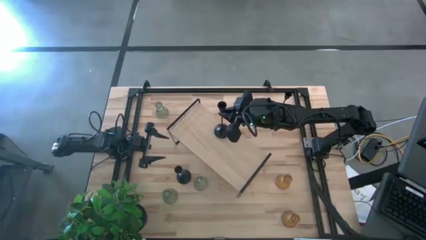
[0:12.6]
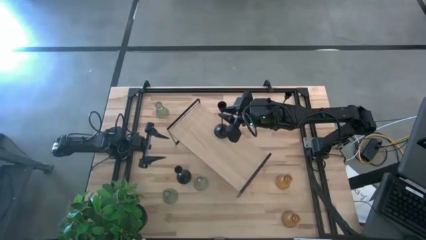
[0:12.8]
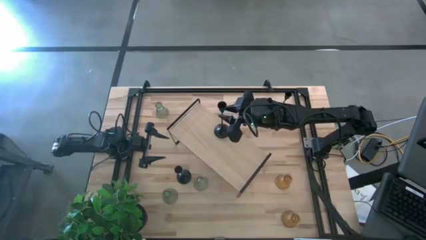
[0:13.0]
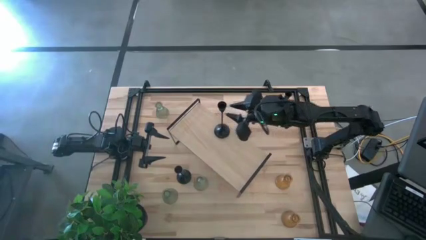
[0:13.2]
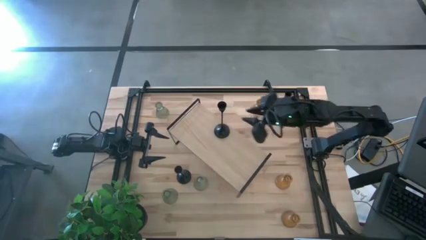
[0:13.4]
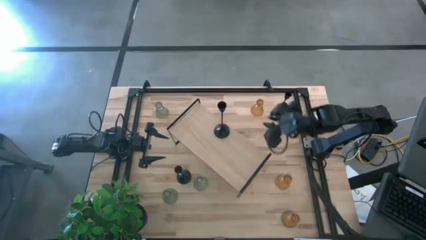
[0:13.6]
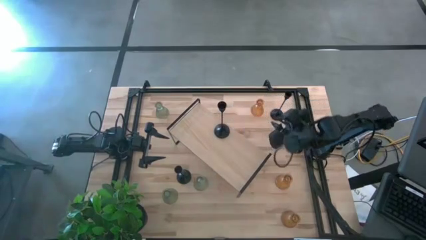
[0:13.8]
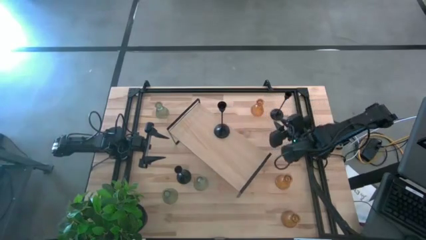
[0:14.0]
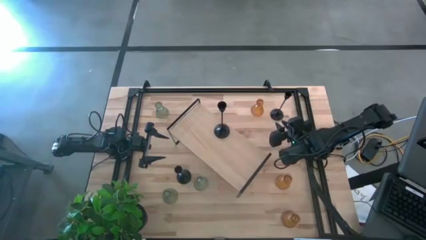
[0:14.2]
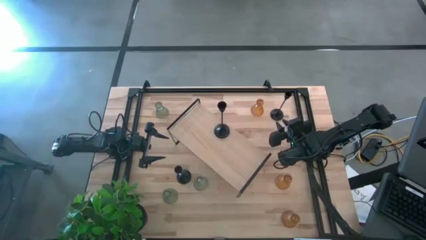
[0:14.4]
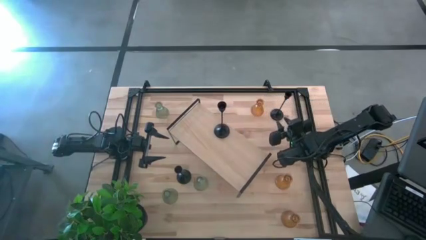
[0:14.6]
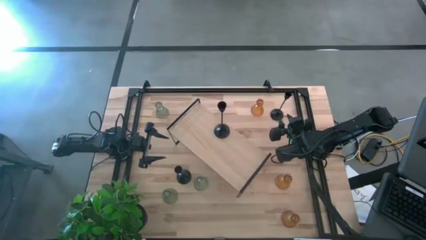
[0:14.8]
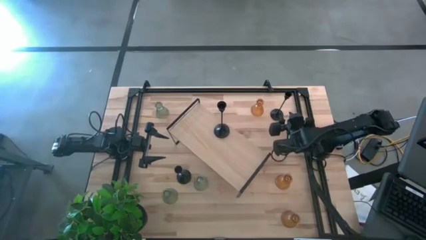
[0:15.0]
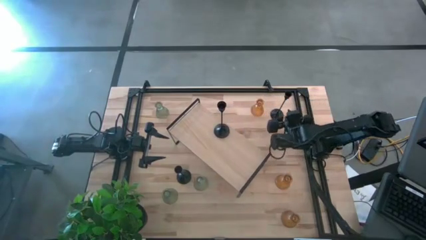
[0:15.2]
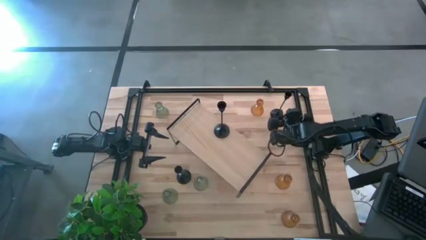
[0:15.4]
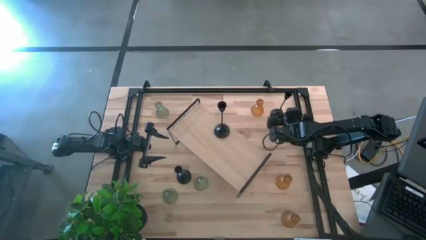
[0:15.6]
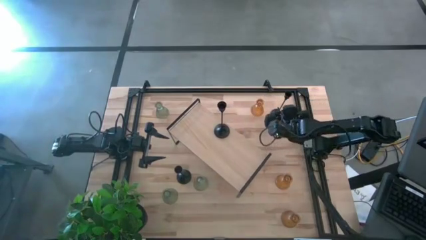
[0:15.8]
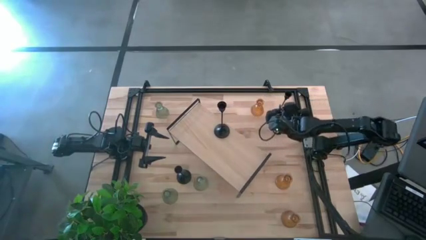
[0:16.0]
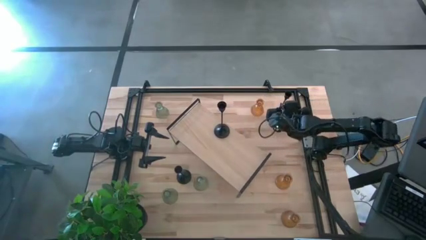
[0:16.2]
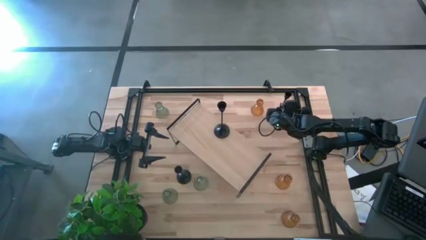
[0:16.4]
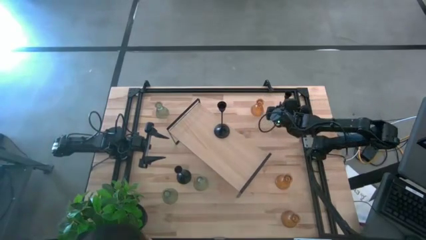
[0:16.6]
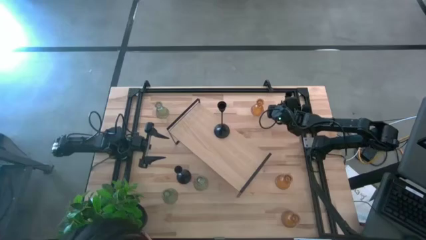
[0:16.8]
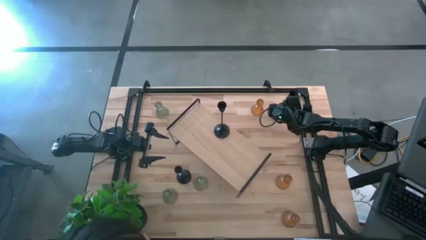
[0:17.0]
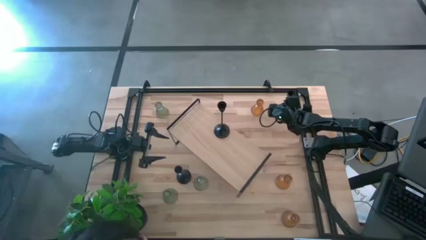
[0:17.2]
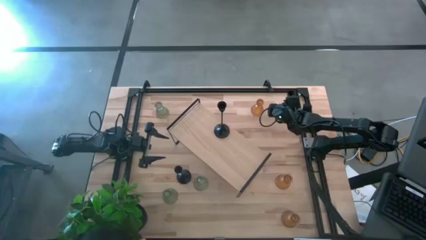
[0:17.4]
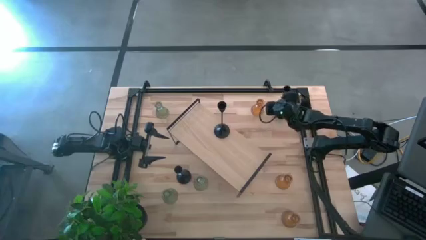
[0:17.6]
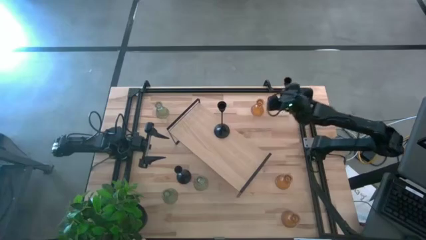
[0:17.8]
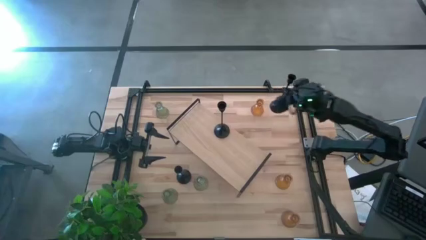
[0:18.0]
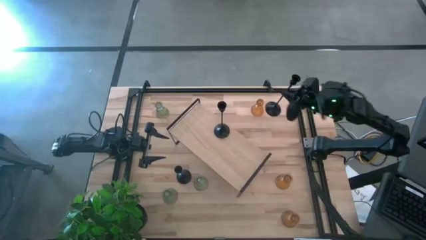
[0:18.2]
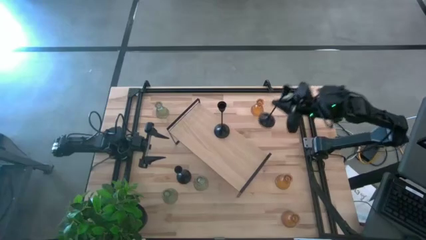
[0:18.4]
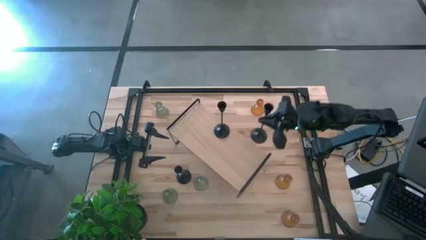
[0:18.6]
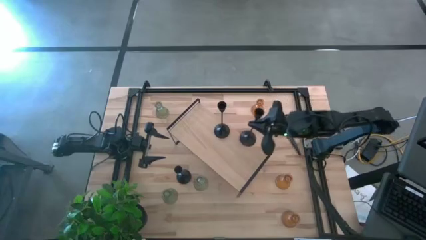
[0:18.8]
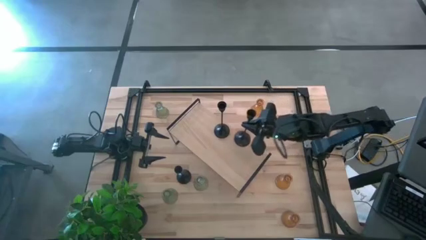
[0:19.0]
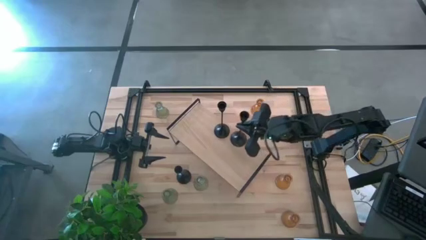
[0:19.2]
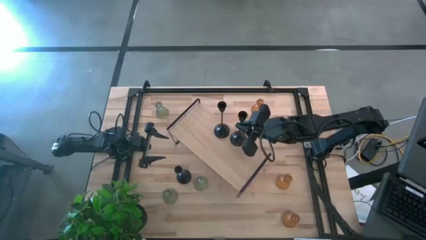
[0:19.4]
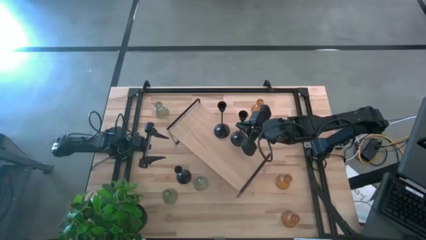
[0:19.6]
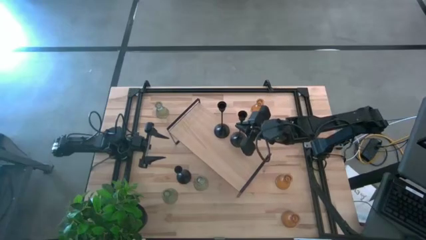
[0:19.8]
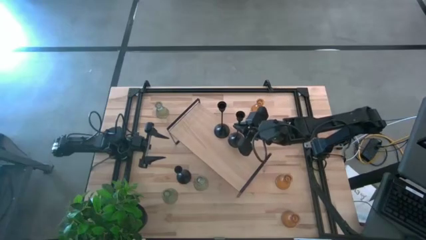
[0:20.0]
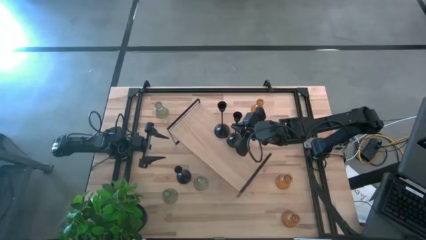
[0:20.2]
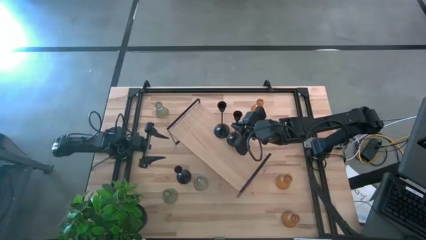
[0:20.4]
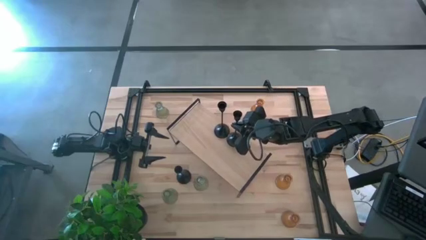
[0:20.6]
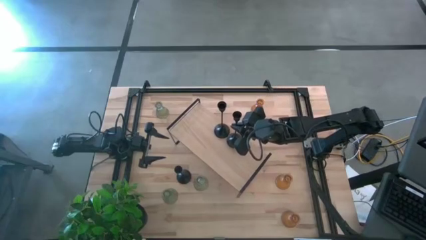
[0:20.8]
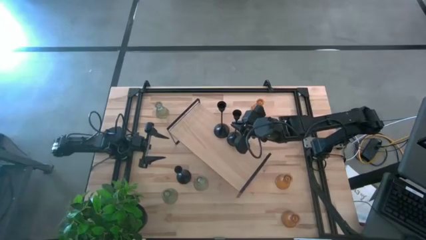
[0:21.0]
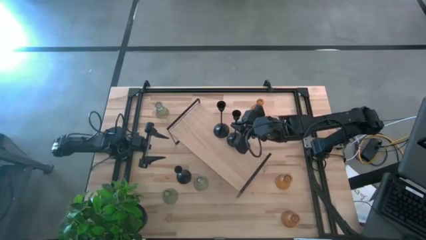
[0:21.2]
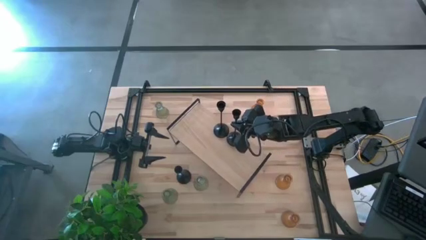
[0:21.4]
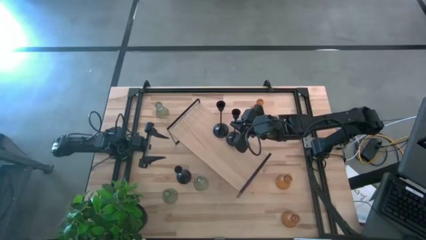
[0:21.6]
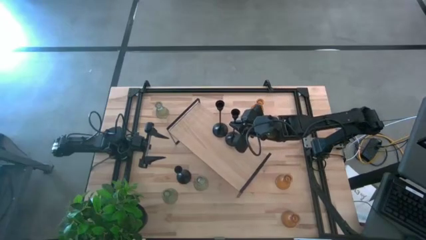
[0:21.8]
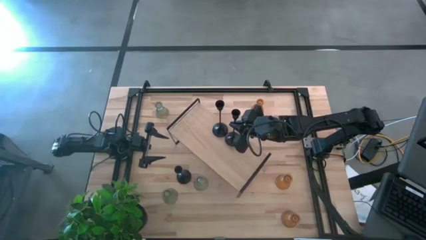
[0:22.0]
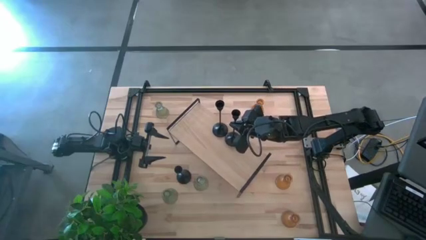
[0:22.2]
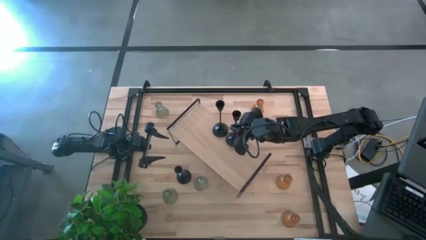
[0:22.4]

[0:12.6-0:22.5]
Task: Pick & Place candle stick holders
Put the top black candle holder on the shelf
